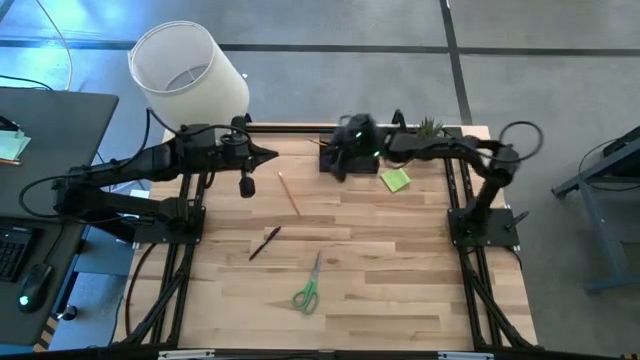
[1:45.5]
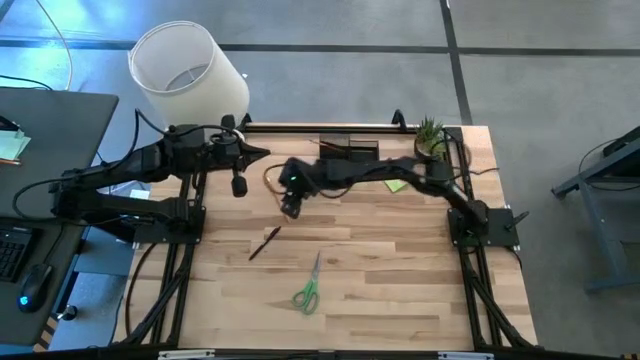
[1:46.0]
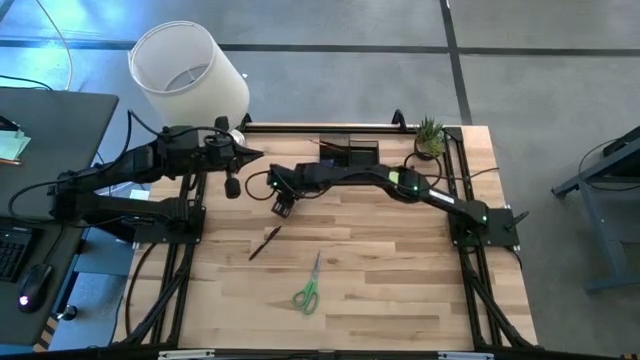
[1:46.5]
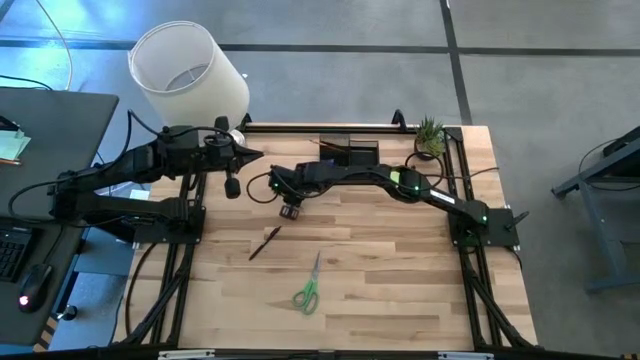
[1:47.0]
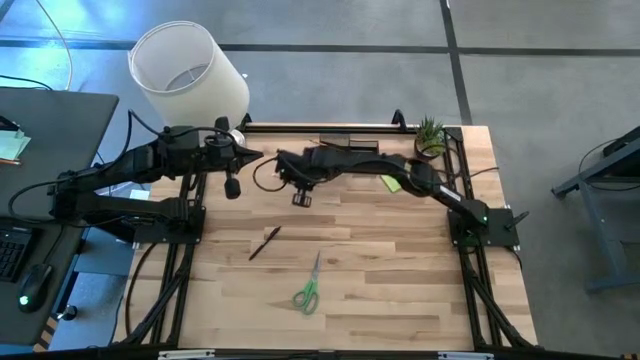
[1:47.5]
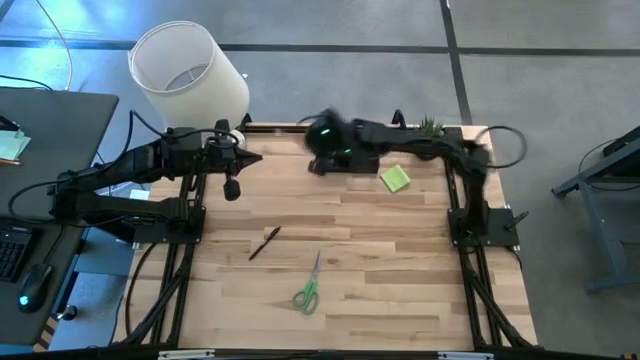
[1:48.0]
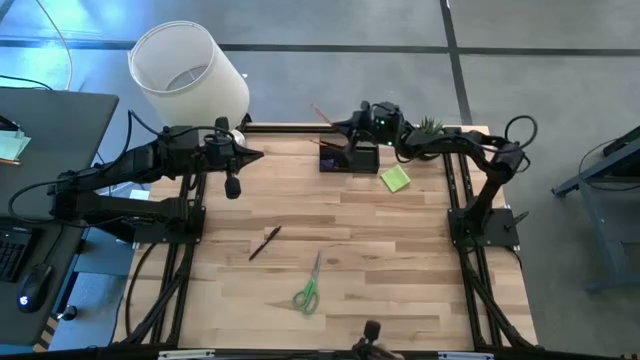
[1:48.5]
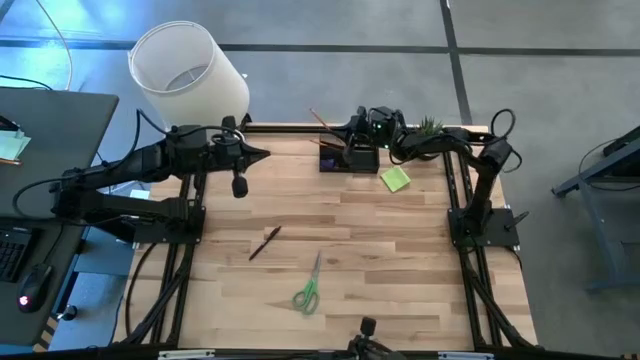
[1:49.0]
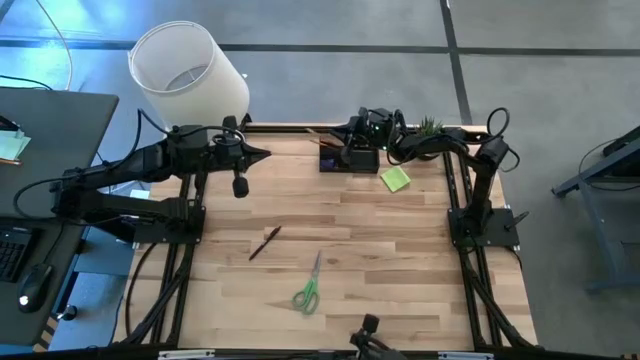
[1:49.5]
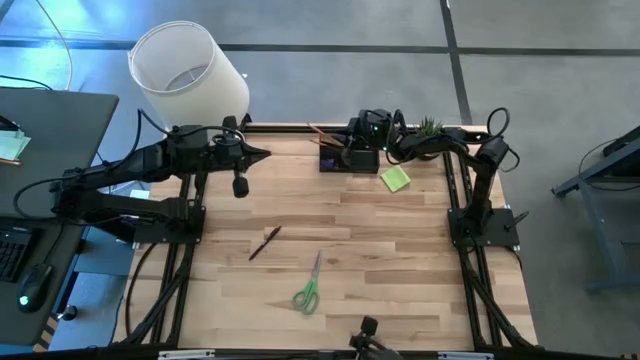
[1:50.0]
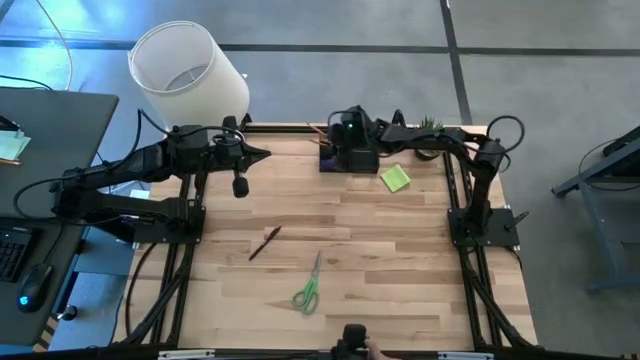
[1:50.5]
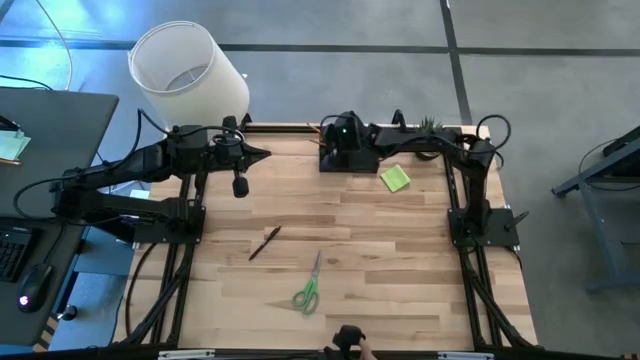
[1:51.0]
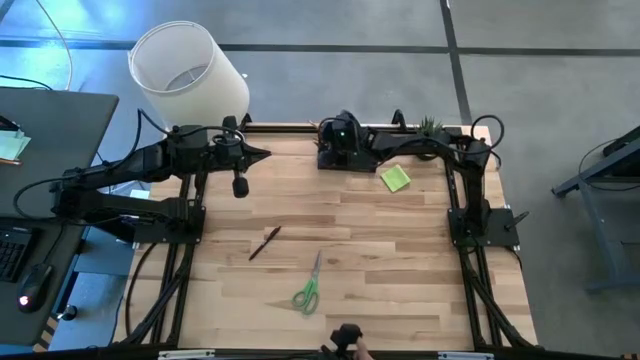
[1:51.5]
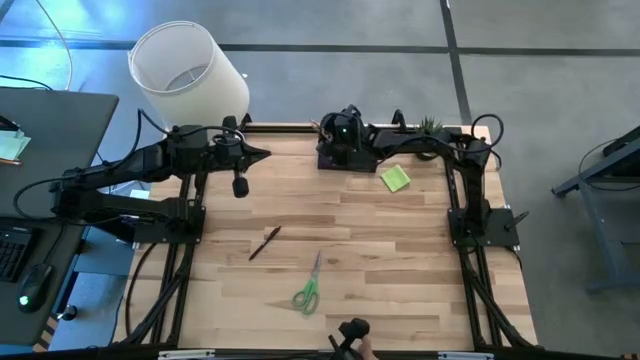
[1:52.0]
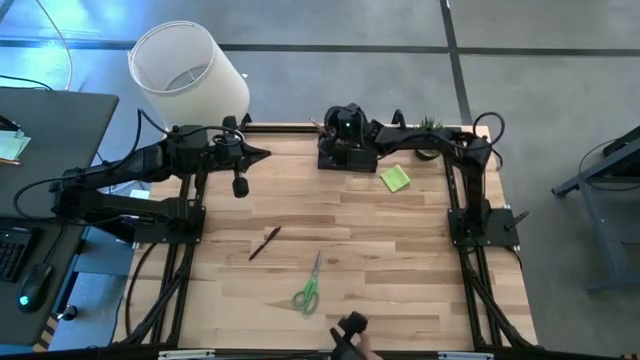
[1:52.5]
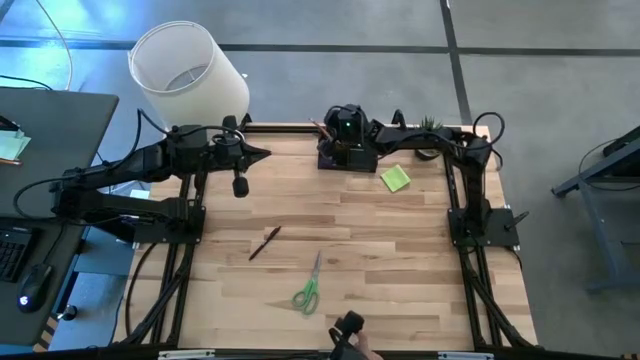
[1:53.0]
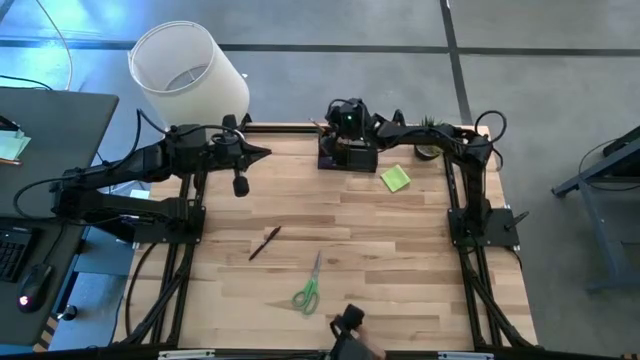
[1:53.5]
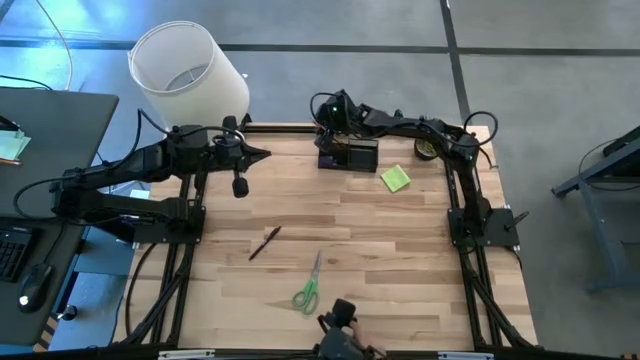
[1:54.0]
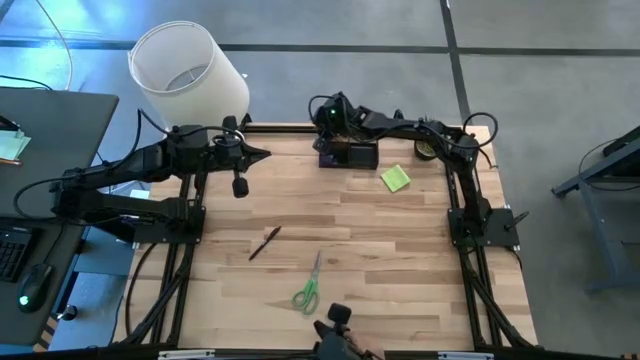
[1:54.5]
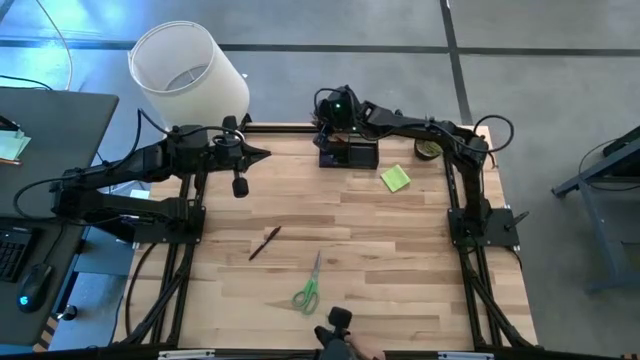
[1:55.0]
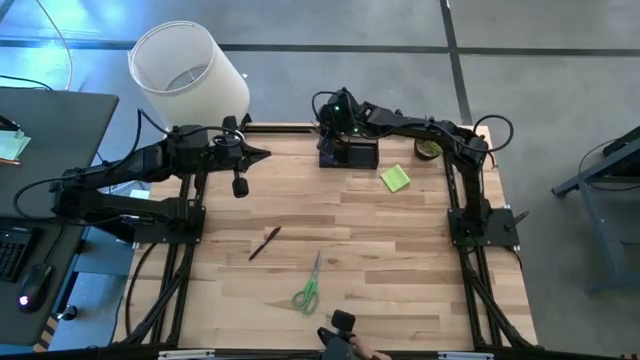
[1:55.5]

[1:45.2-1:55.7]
Task: Pick and place office supplies into organizer
Put the orange pencil into the black desk organizer

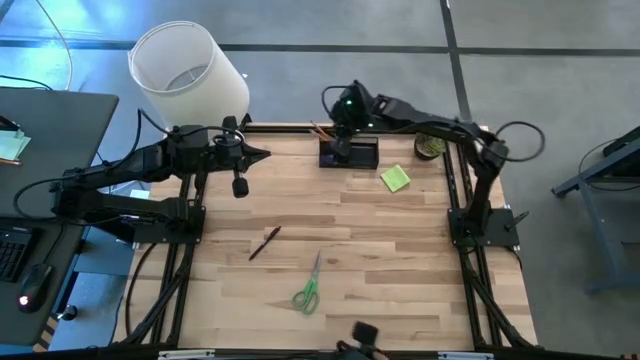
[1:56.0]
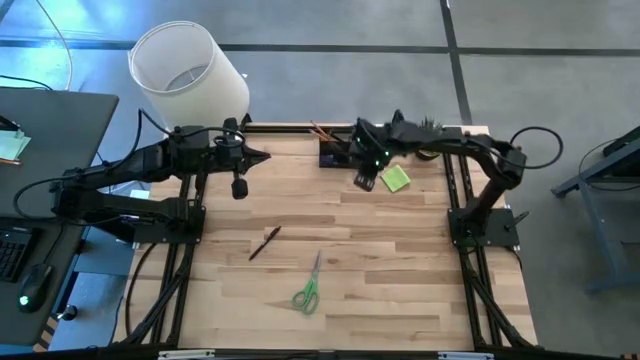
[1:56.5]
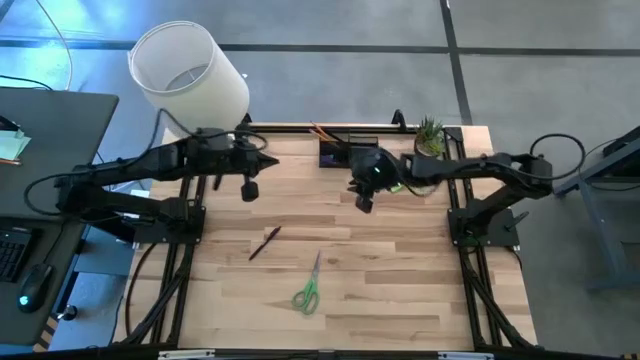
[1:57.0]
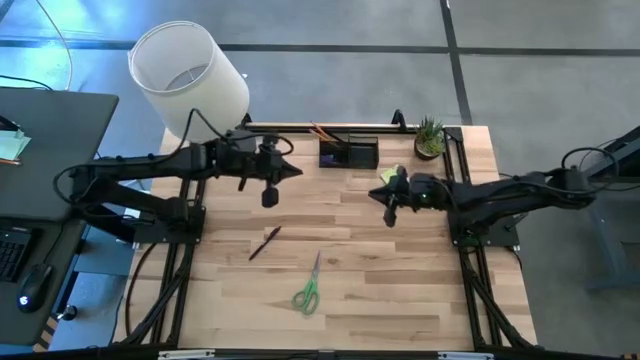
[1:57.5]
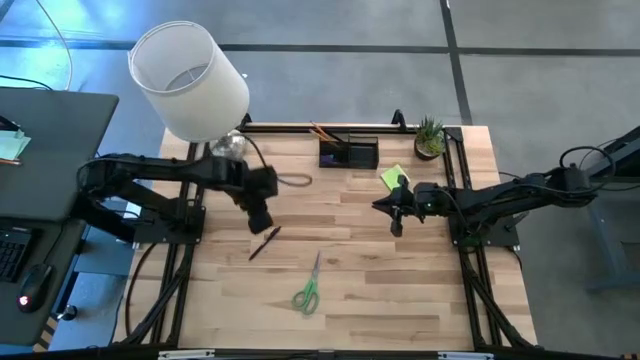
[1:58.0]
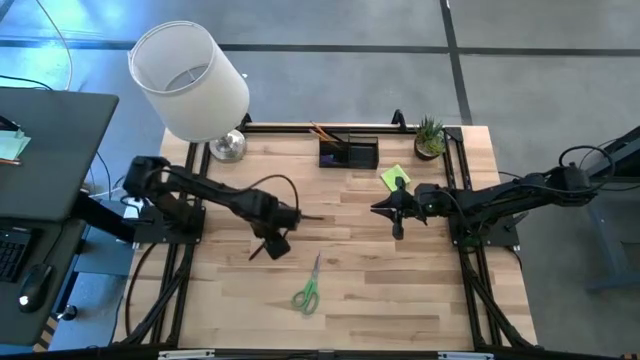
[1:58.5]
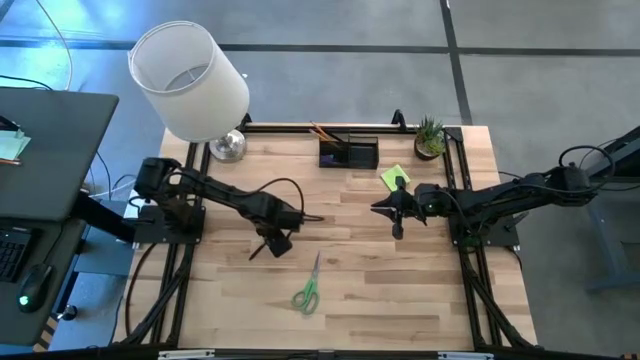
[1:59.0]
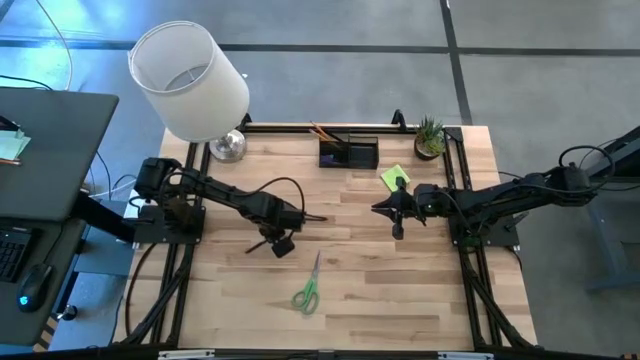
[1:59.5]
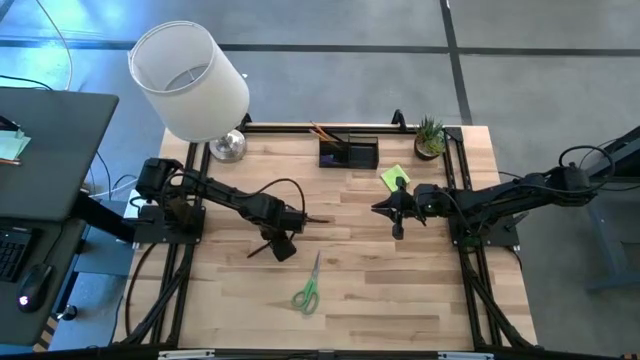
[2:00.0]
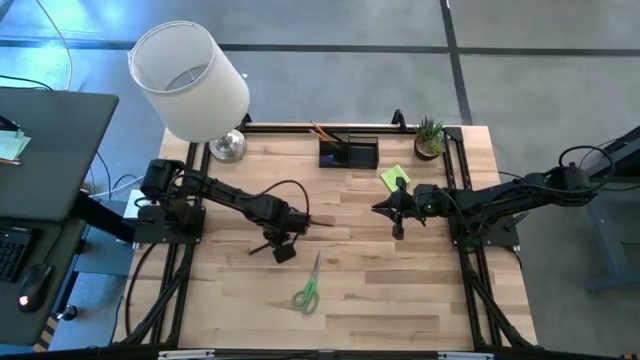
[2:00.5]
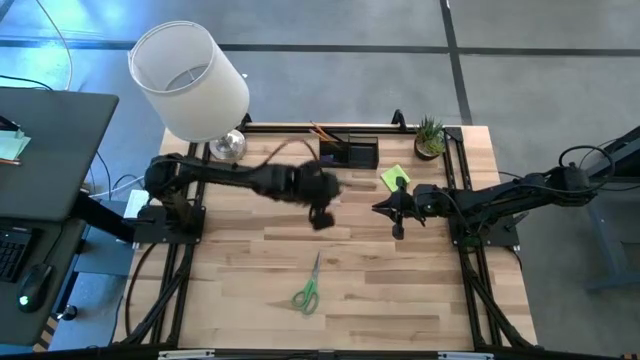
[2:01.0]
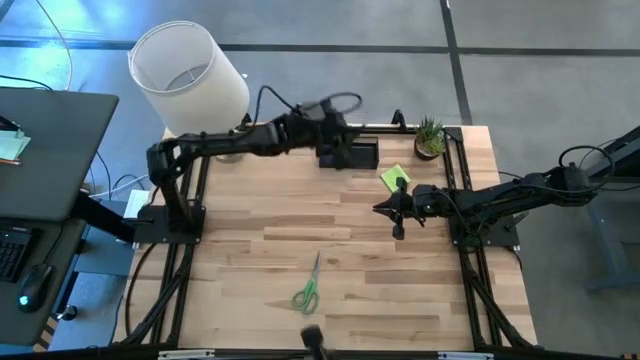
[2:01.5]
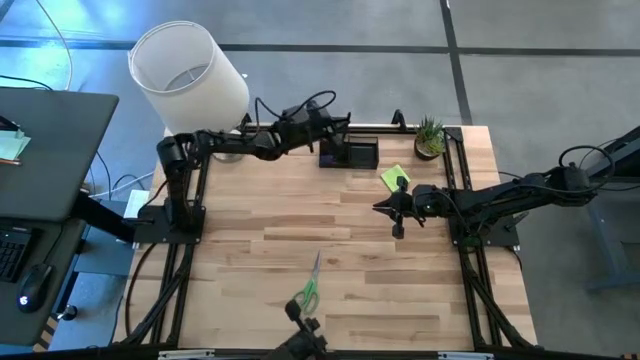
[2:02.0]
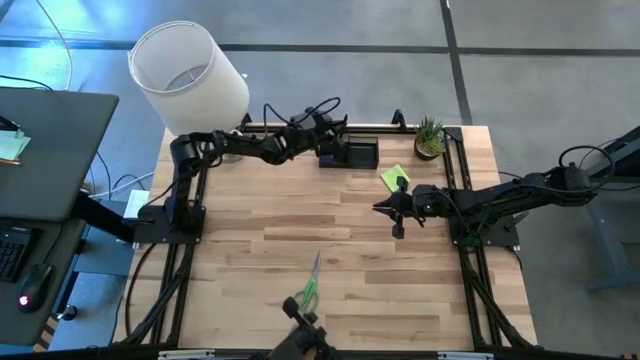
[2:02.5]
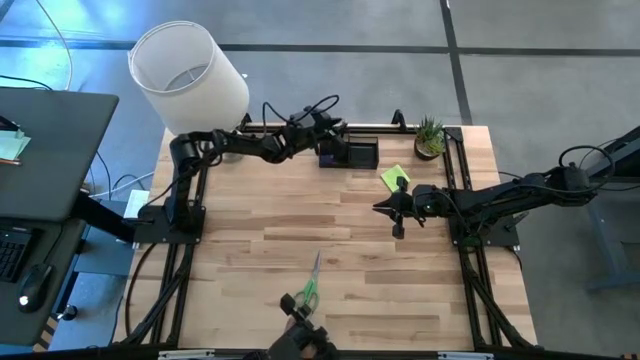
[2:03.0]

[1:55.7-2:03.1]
Put the black pen into the black desk organizer

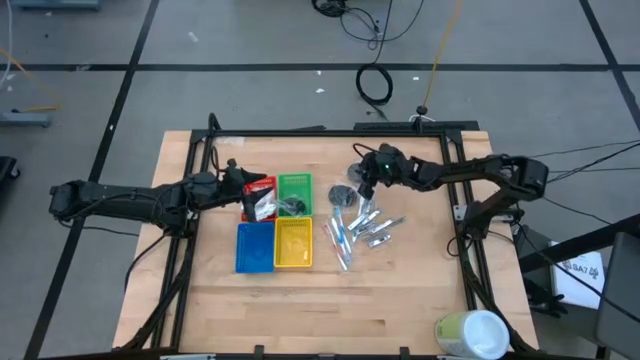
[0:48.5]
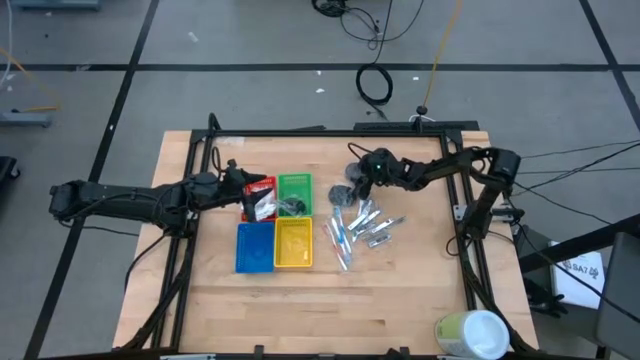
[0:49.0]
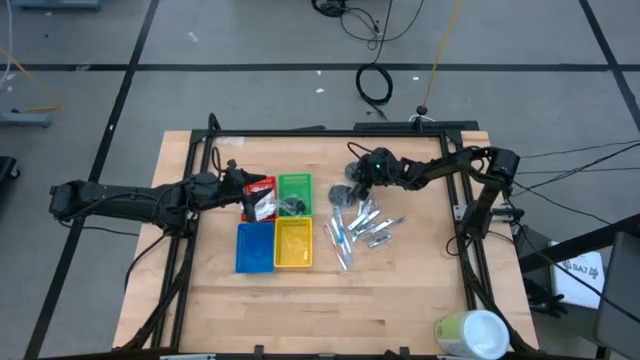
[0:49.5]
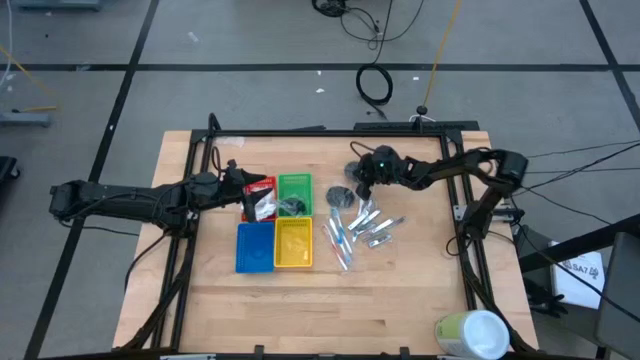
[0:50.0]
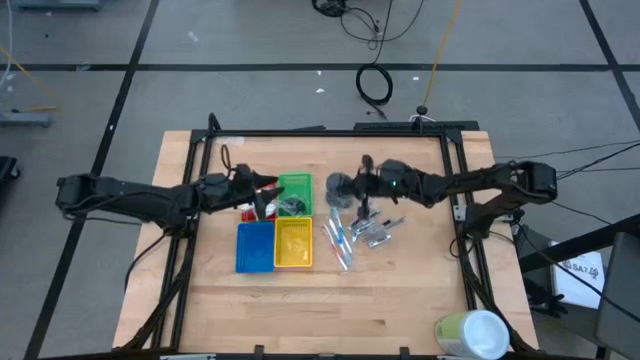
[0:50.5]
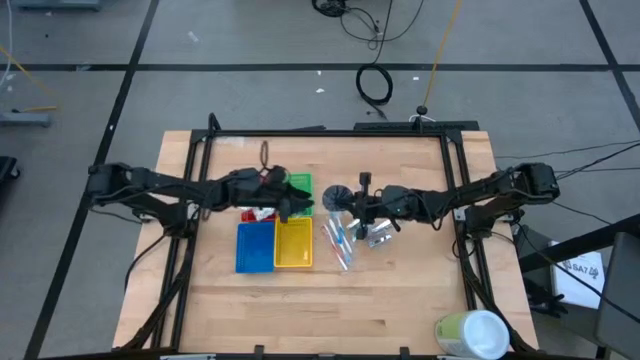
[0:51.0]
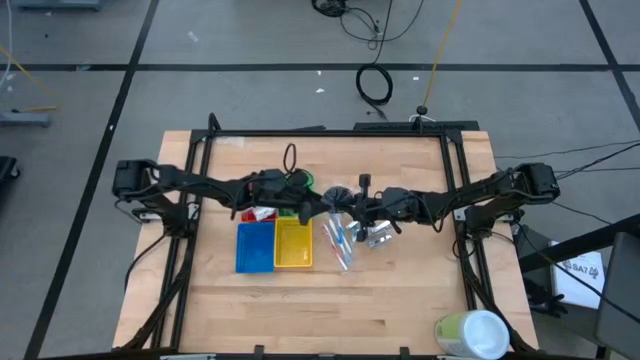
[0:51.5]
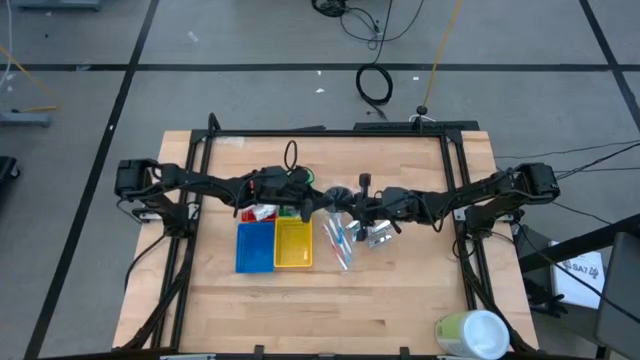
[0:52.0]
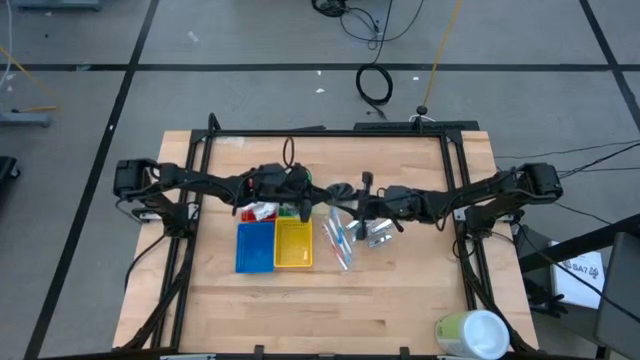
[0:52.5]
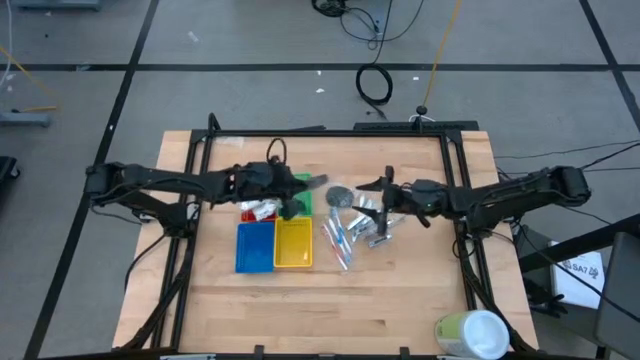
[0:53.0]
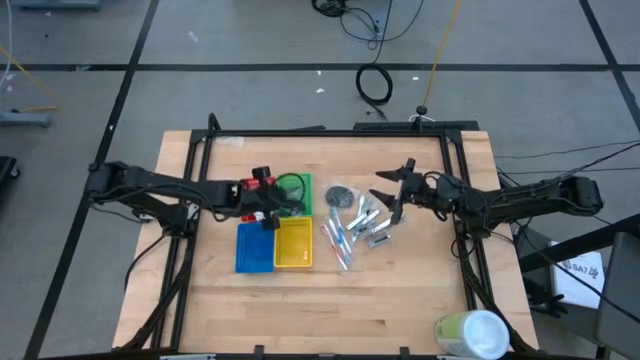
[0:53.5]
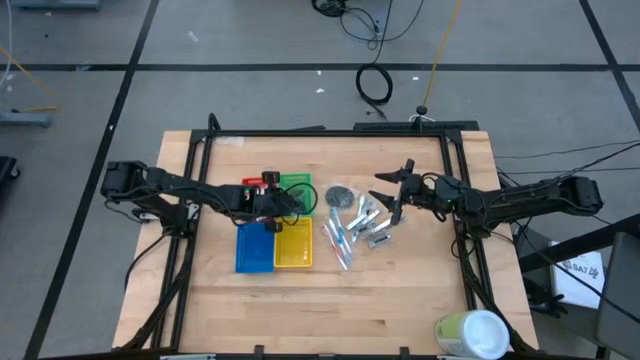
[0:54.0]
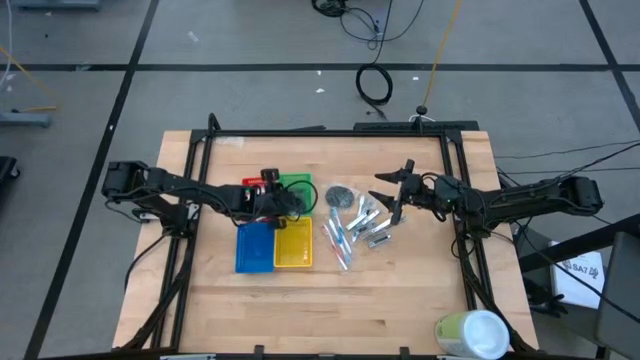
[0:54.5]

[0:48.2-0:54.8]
Task: Pick & Place Travel size toiletries
Put the black hairbrush into the green bin
